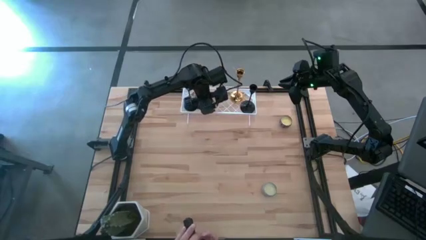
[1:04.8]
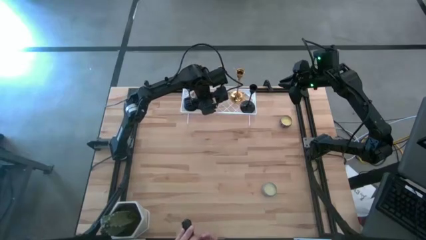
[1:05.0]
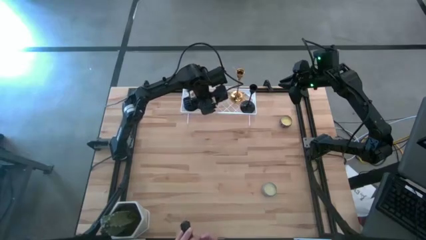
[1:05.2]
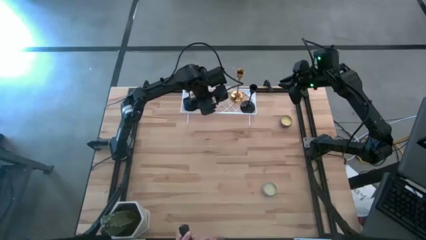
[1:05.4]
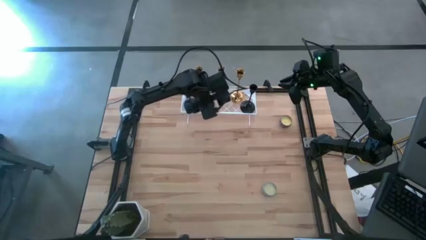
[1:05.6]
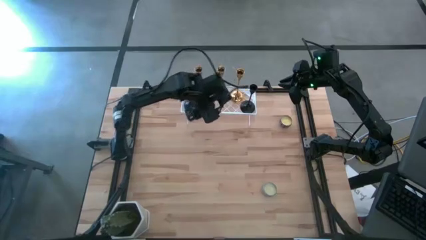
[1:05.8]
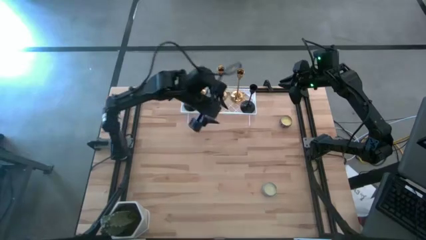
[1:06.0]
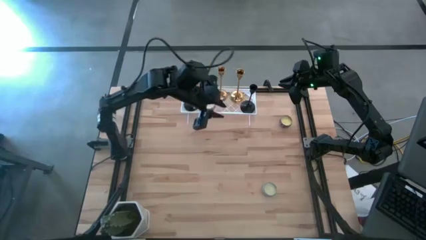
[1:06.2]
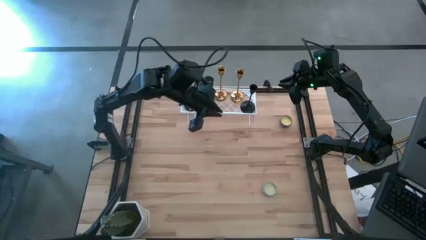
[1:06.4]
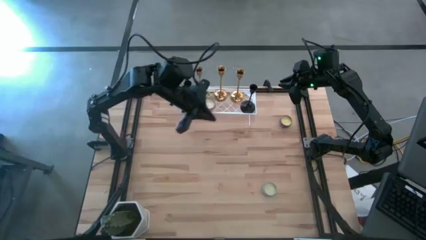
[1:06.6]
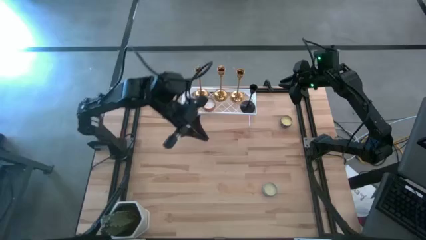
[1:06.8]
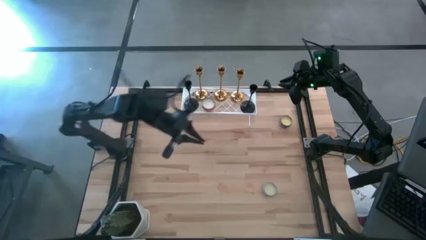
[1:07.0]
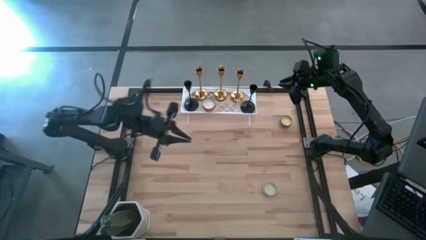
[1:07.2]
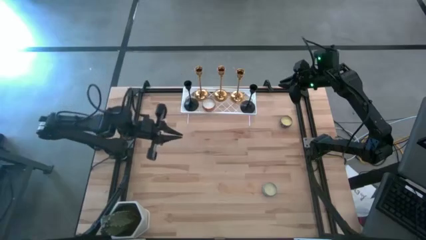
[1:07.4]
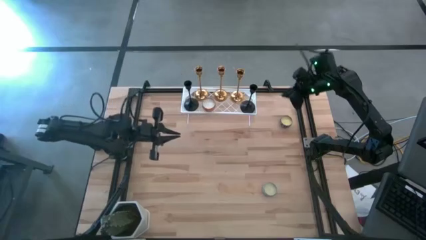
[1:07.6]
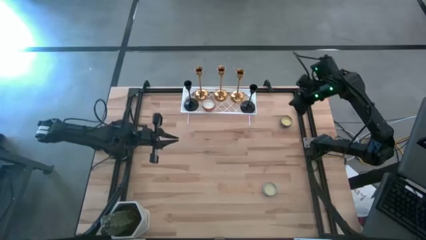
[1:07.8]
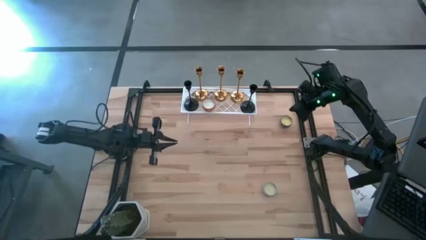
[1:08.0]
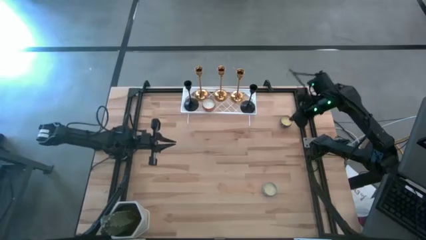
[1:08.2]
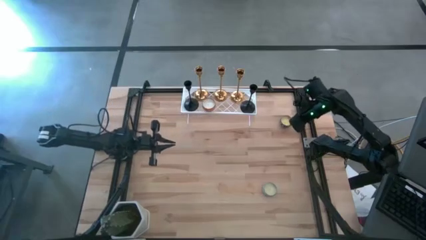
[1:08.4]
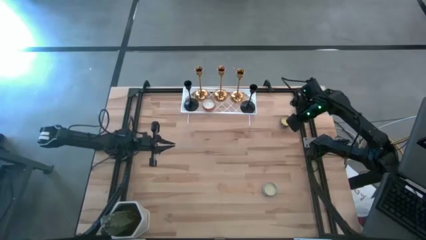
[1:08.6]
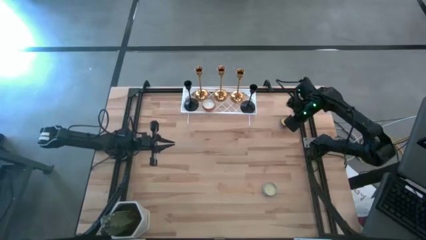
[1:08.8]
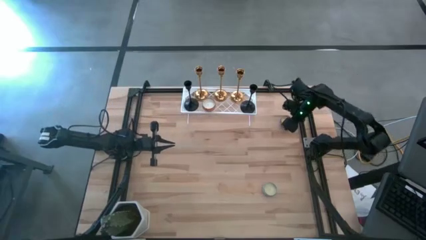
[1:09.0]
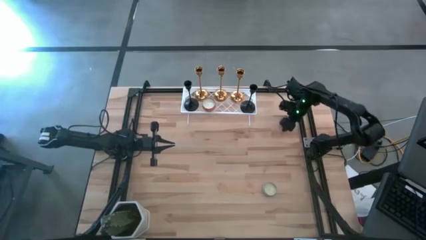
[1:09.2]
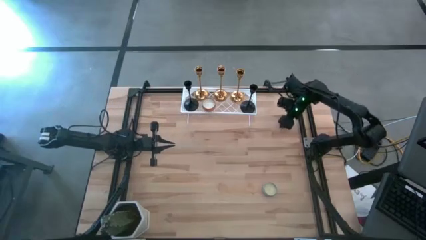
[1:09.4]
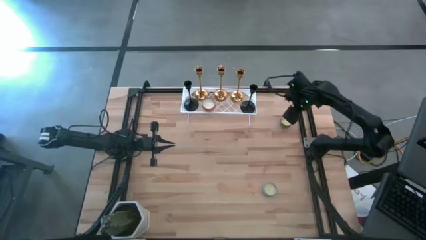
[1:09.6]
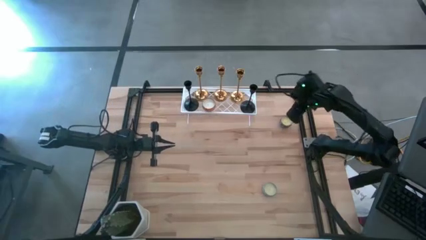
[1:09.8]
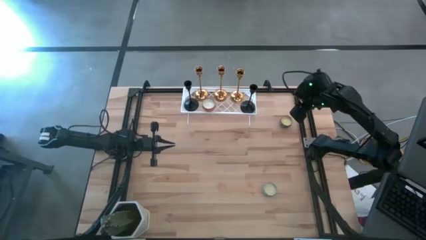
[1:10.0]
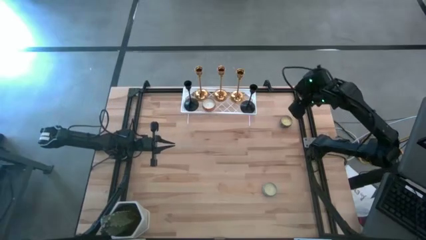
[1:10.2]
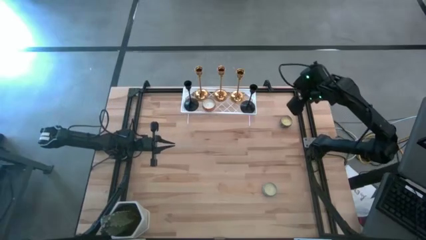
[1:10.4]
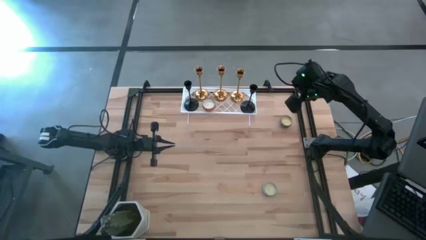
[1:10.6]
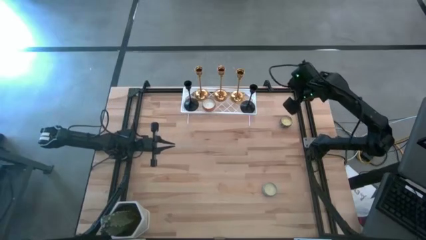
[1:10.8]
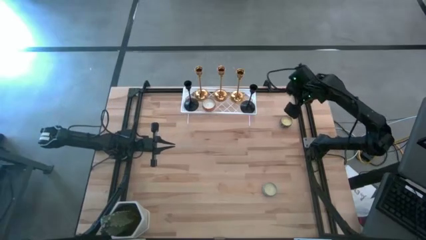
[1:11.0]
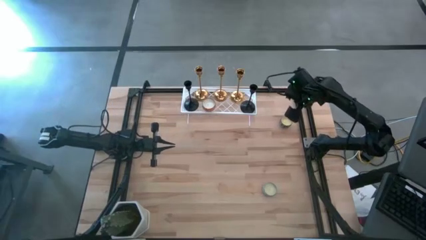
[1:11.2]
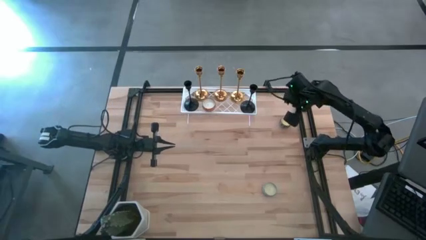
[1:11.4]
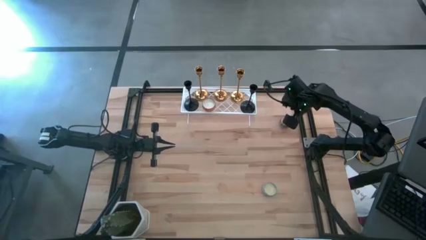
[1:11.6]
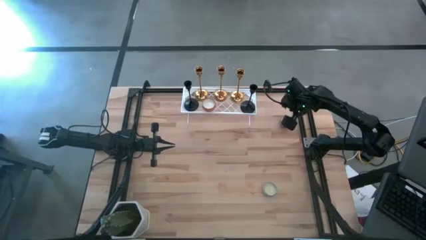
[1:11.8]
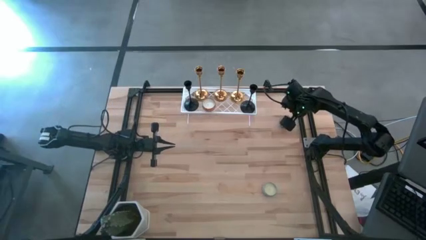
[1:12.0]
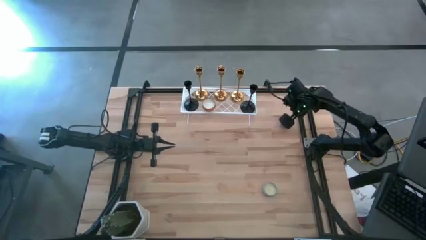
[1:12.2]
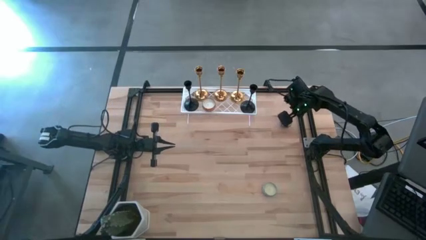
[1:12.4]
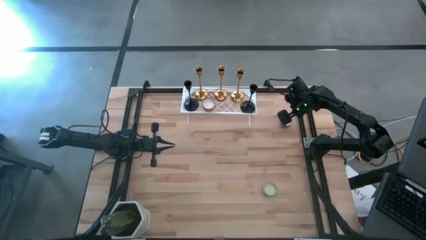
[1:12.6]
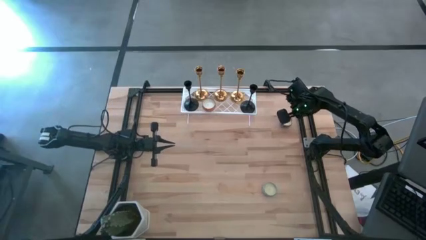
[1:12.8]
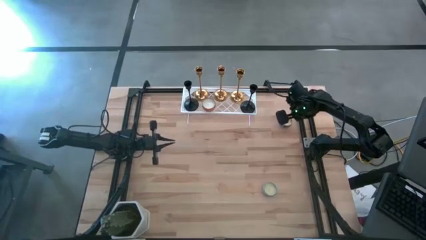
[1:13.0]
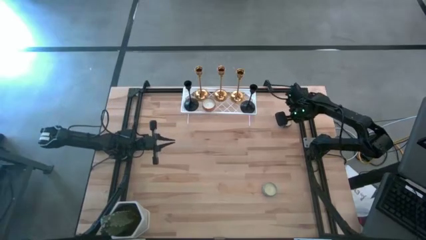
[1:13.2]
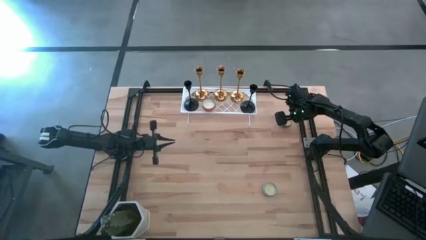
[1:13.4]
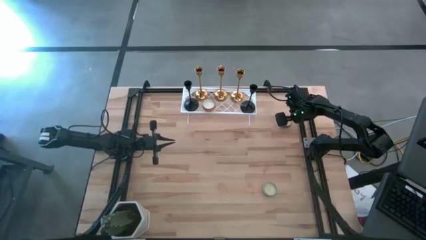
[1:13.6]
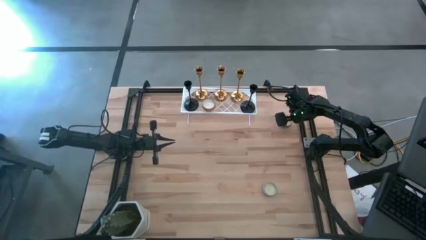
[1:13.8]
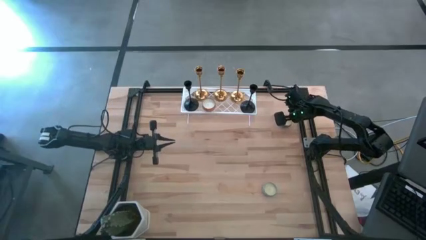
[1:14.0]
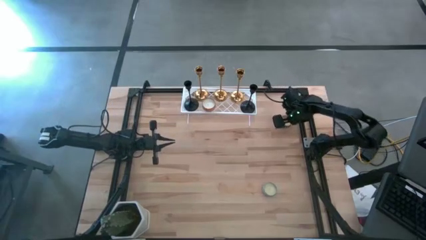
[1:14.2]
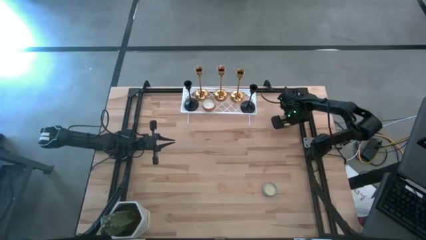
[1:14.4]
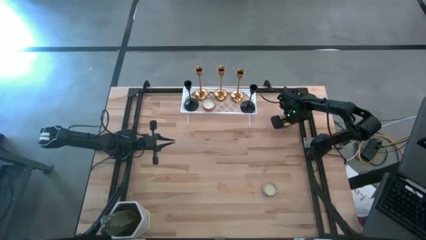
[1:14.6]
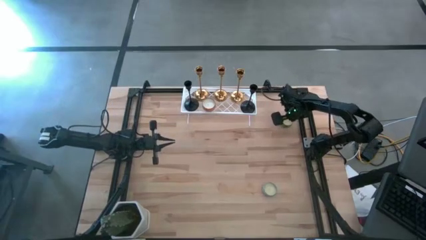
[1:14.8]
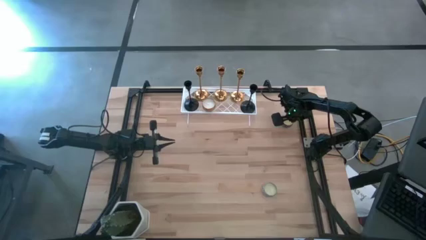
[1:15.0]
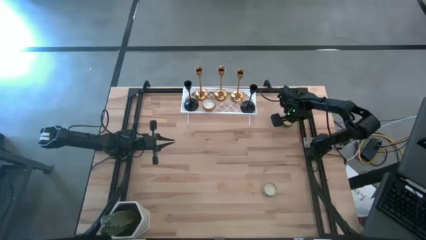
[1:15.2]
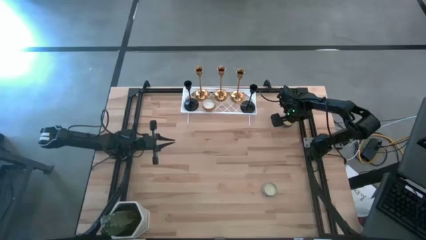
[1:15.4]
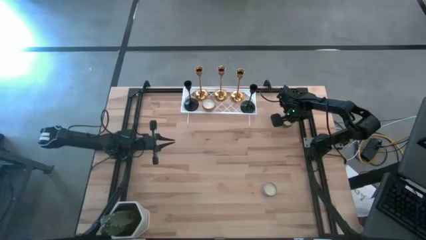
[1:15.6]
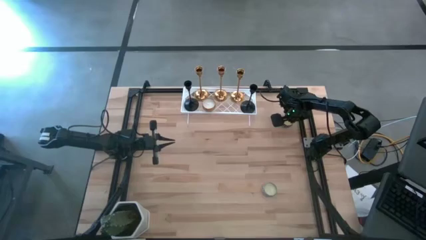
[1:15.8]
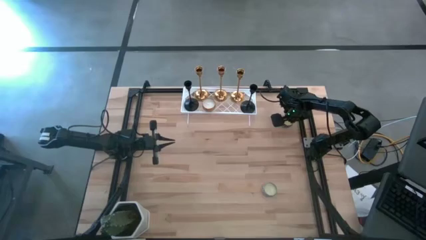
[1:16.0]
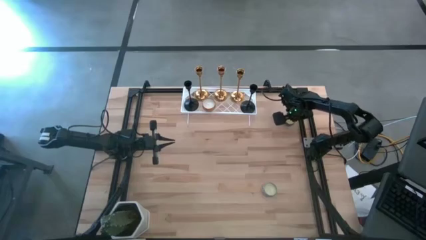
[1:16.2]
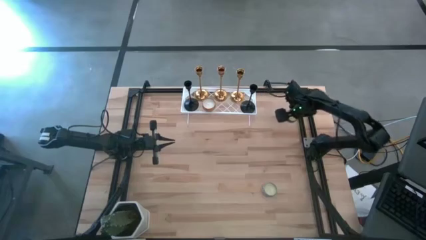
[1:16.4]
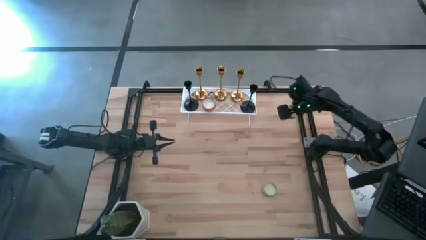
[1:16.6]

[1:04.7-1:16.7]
Task: Pick & Place candle stick holders
Put the yellow scented candle on the shelf

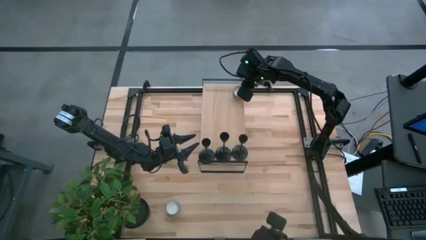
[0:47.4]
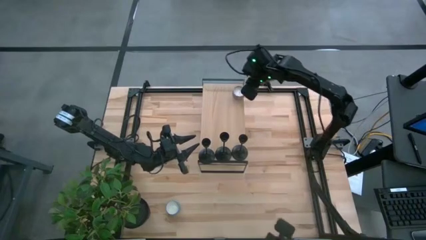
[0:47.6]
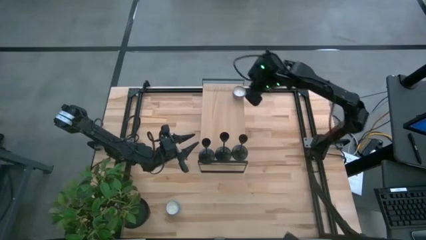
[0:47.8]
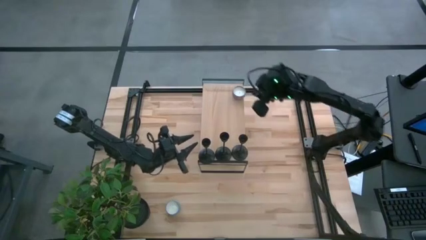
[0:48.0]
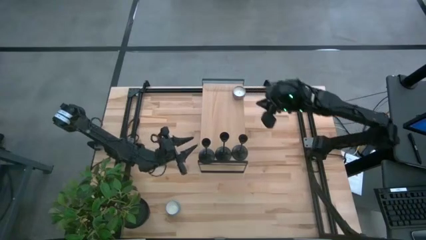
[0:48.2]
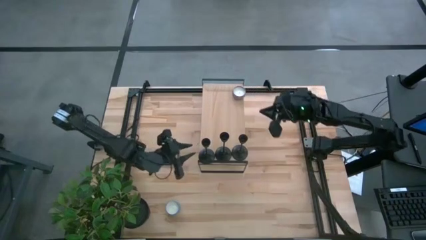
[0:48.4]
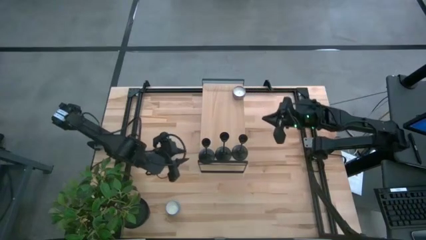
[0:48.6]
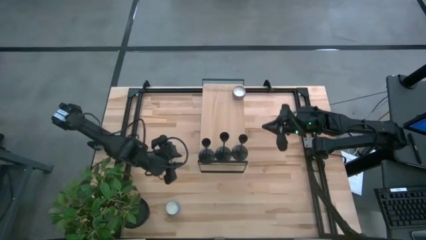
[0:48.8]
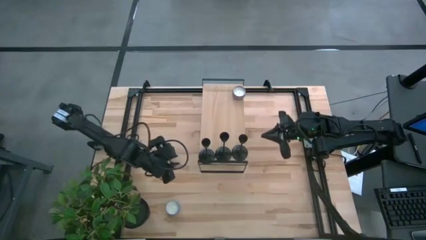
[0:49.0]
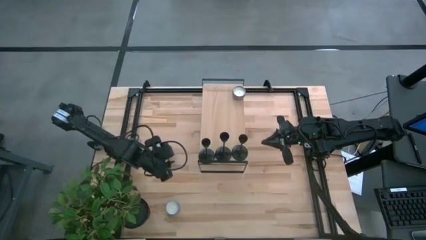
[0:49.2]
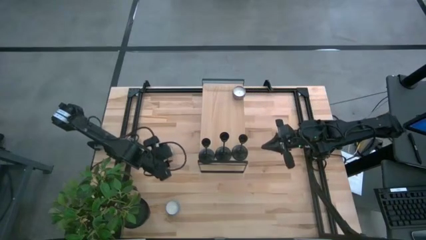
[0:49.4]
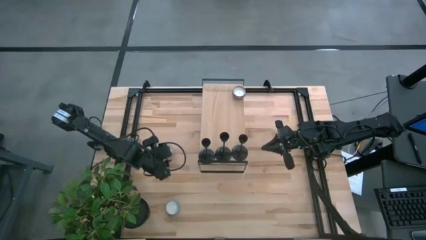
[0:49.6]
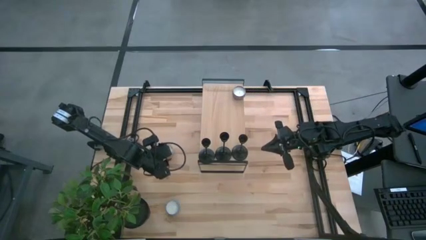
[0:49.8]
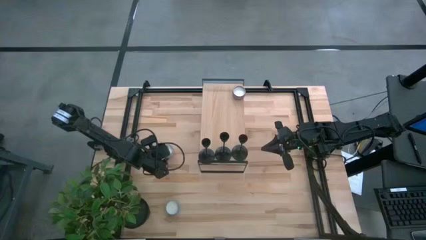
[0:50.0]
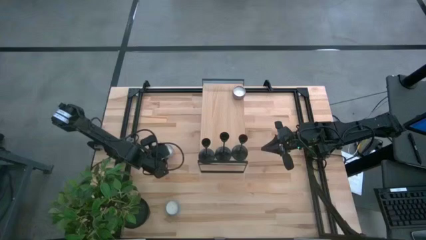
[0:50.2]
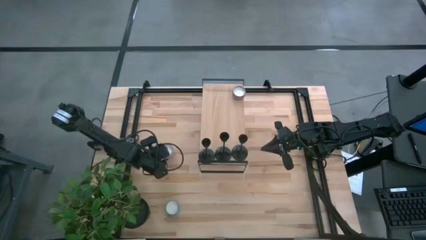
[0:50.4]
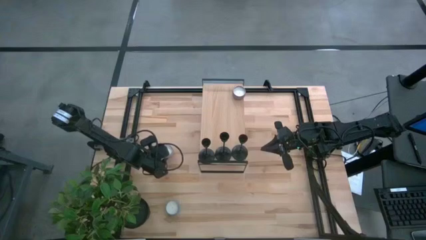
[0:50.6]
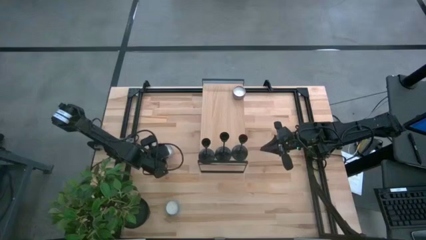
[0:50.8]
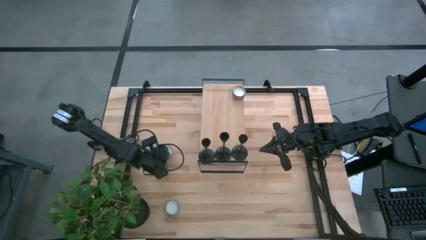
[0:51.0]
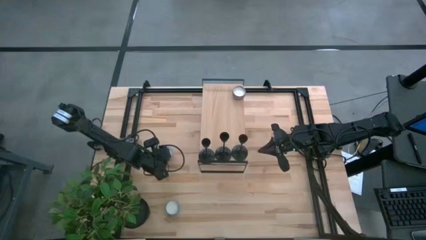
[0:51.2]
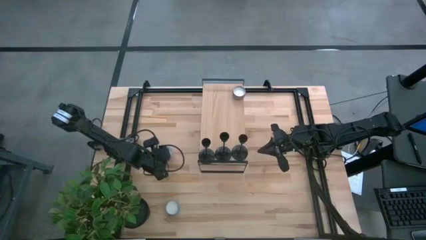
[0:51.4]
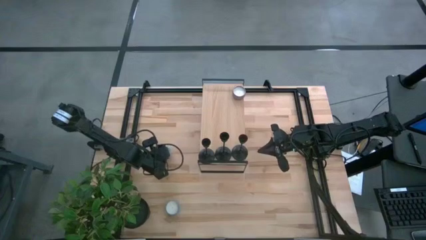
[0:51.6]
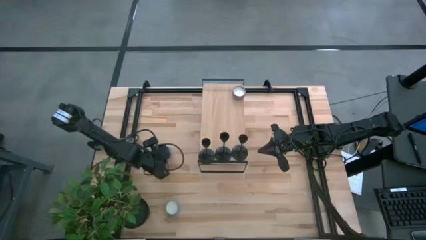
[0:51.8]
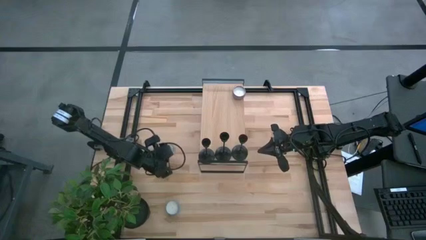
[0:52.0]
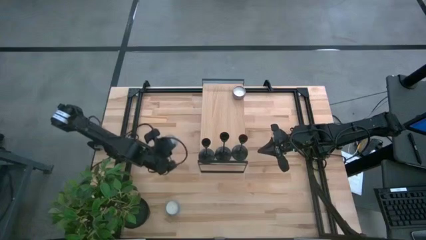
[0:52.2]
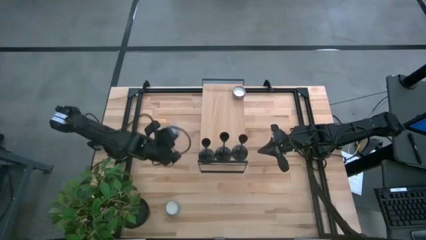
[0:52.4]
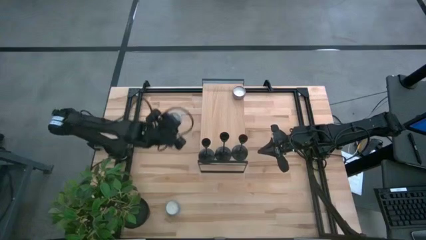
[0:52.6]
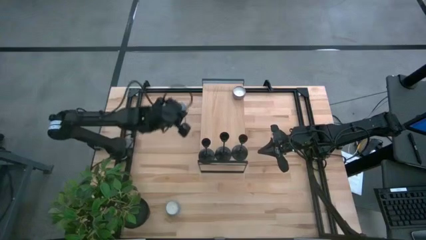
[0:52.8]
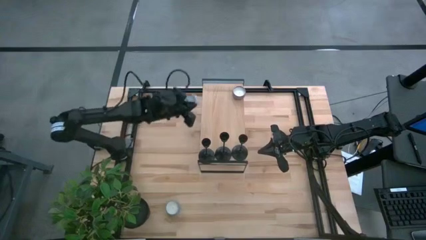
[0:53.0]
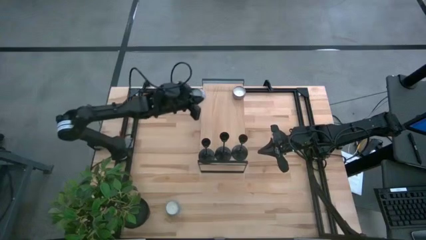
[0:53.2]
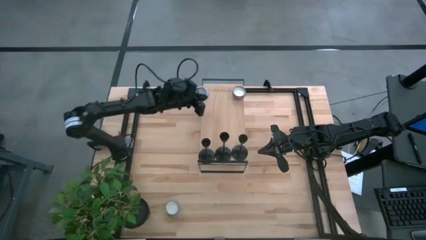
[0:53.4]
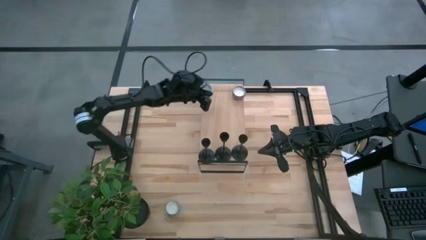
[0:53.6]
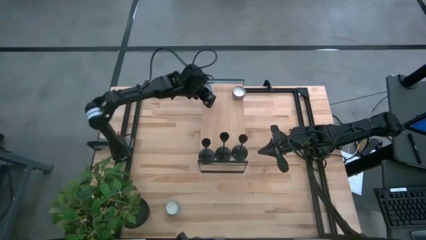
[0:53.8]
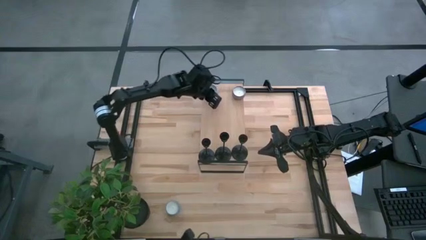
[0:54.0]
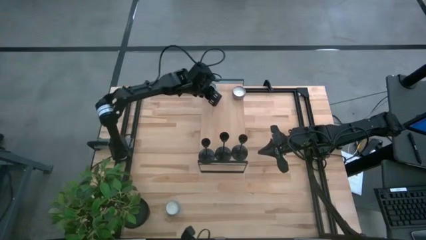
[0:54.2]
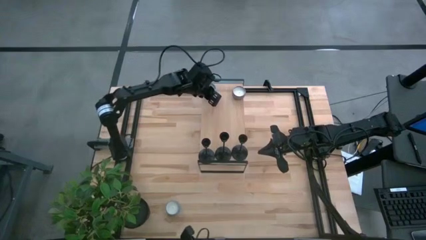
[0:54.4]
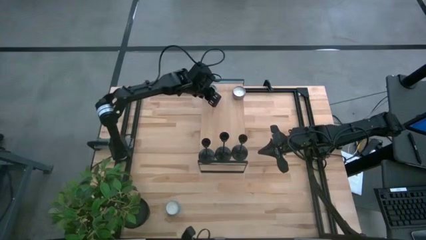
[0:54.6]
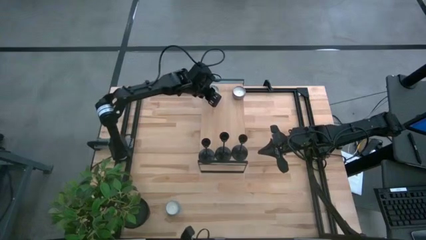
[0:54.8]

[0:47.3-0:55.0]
Task: Pick & Place candle stick holders
Put the red scented candle on the shelf
